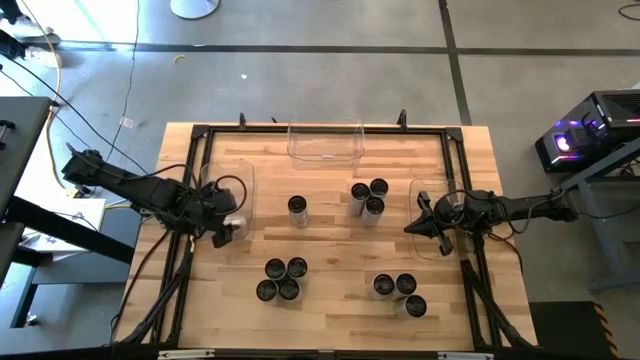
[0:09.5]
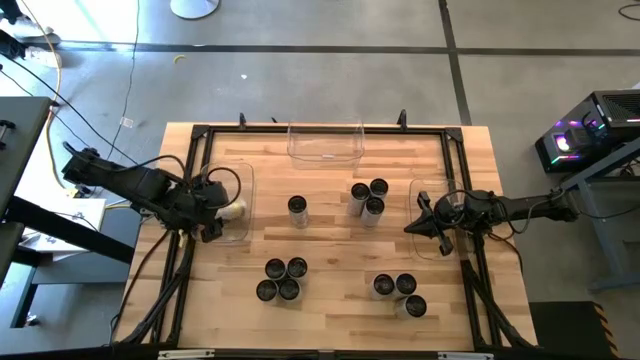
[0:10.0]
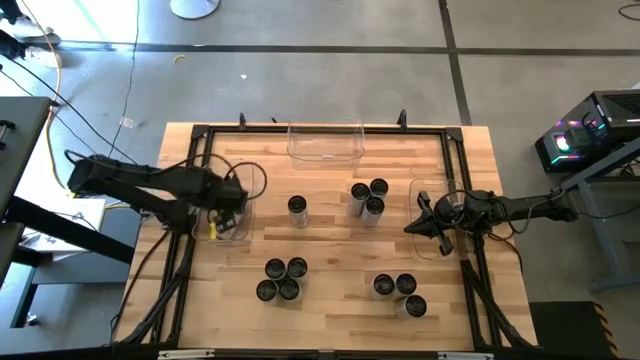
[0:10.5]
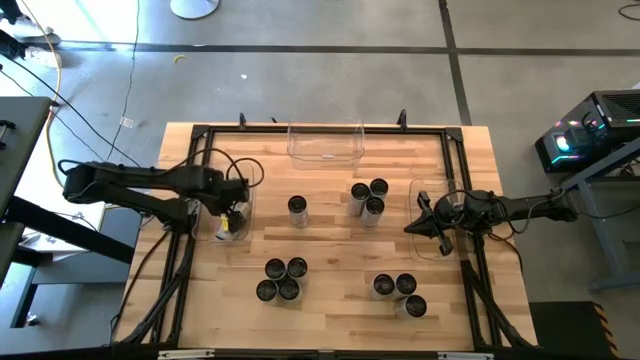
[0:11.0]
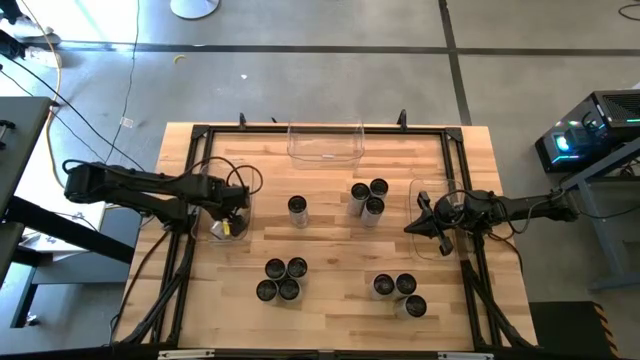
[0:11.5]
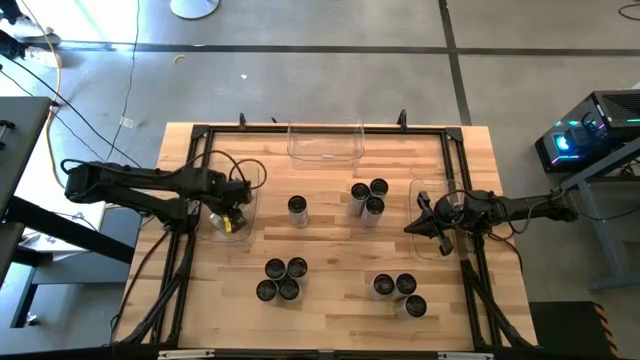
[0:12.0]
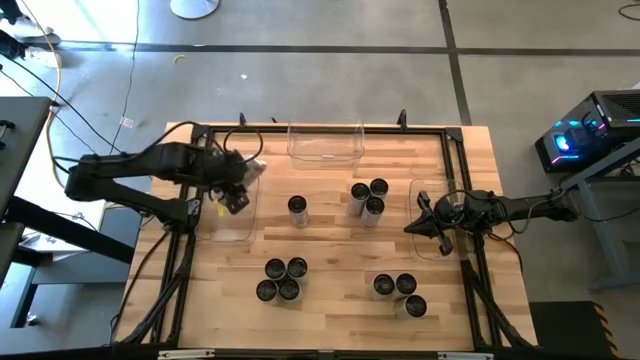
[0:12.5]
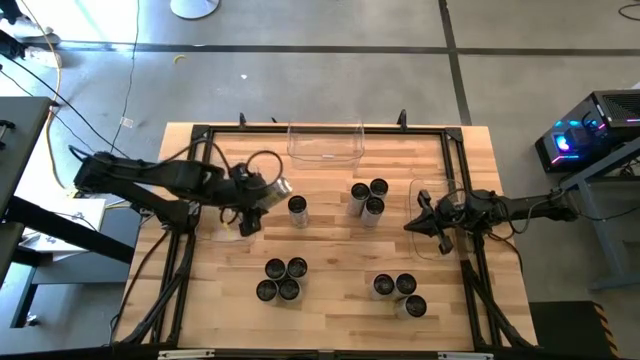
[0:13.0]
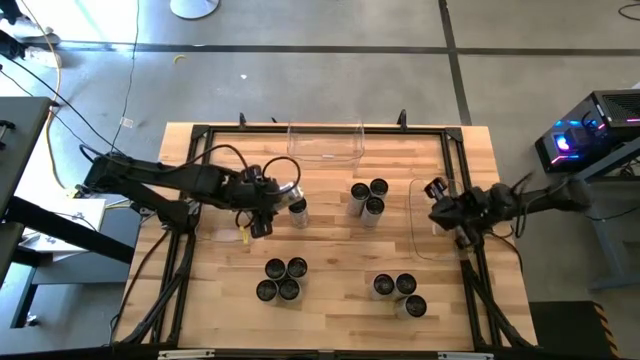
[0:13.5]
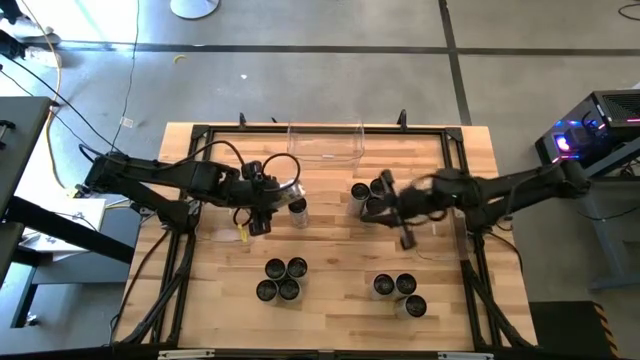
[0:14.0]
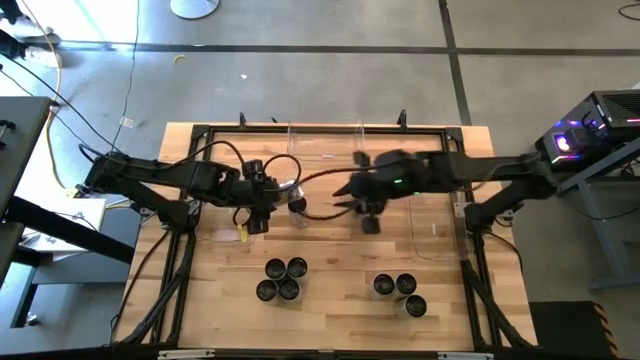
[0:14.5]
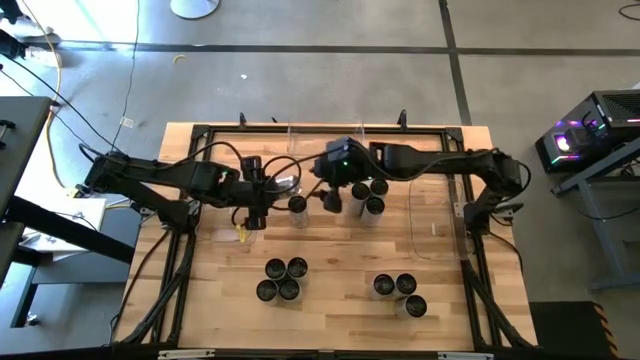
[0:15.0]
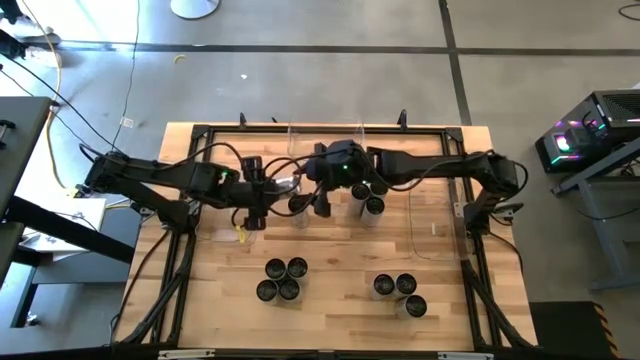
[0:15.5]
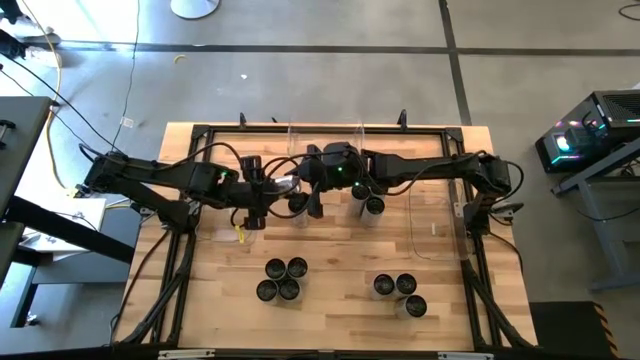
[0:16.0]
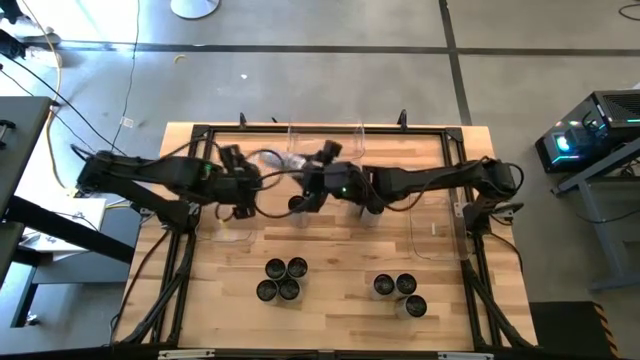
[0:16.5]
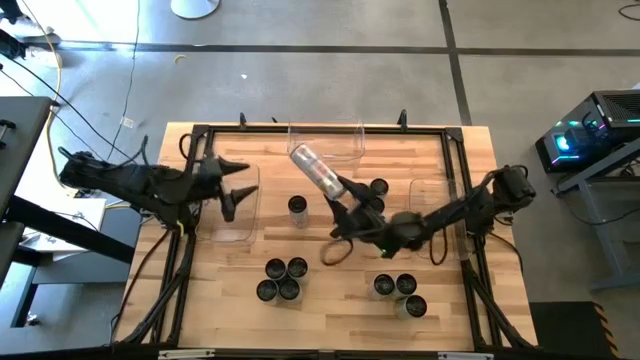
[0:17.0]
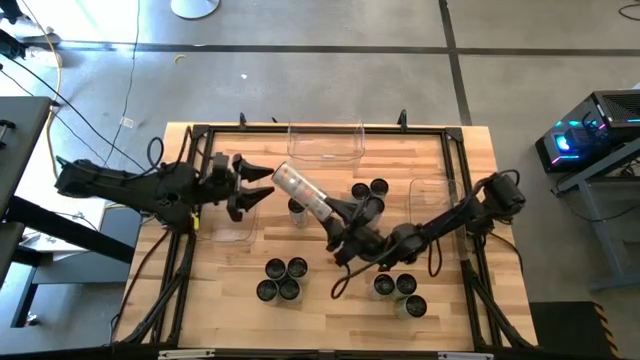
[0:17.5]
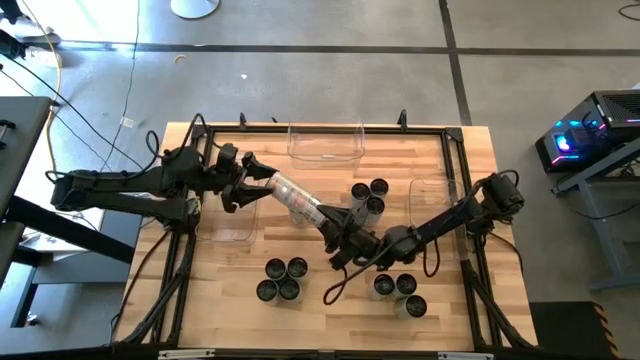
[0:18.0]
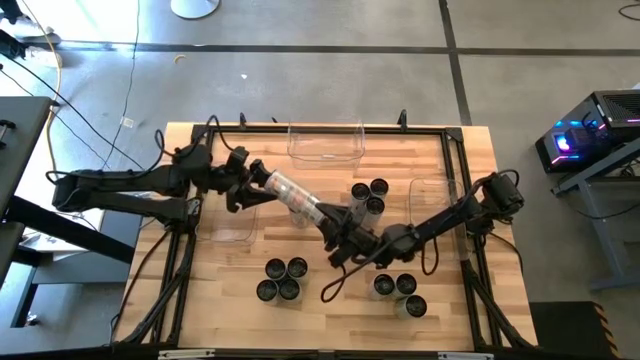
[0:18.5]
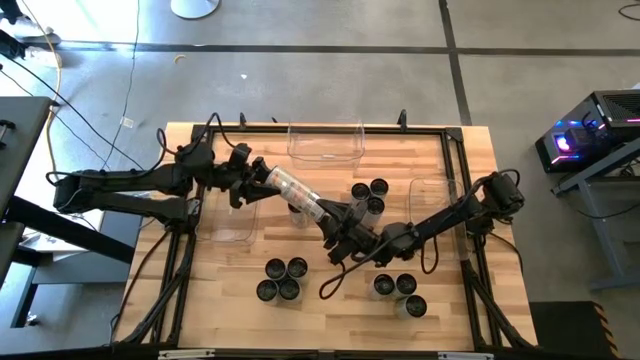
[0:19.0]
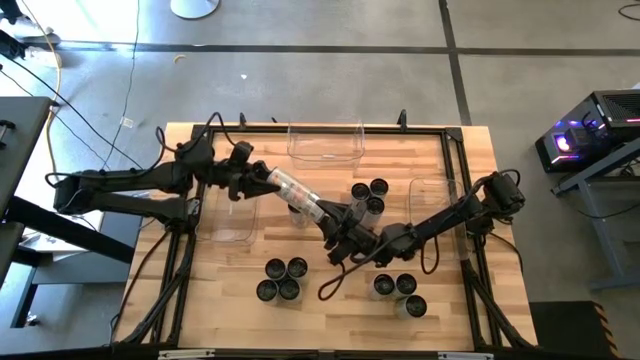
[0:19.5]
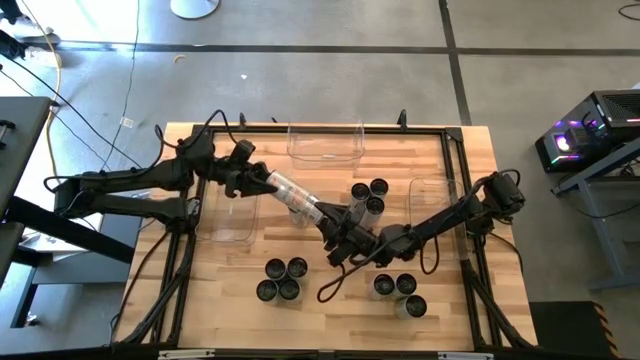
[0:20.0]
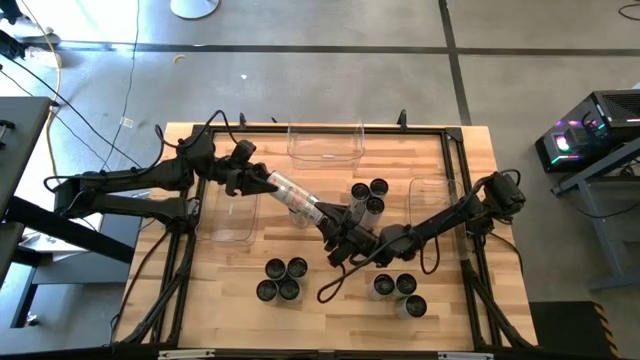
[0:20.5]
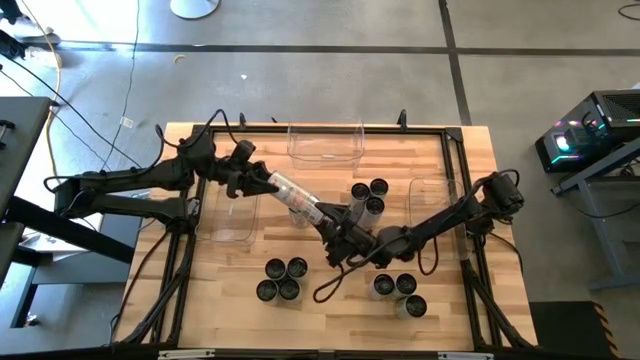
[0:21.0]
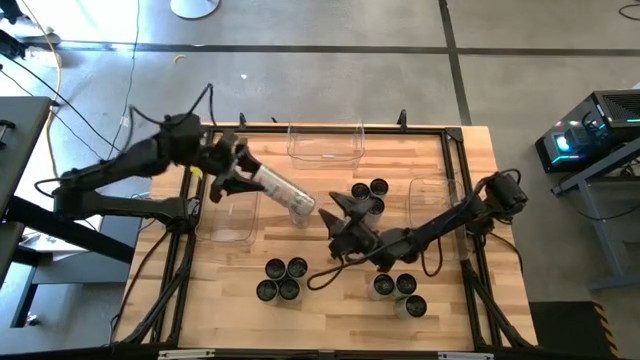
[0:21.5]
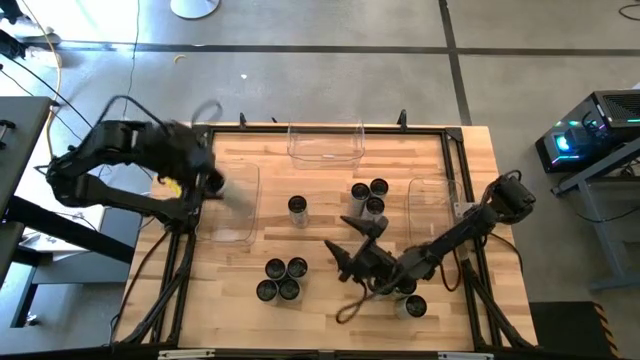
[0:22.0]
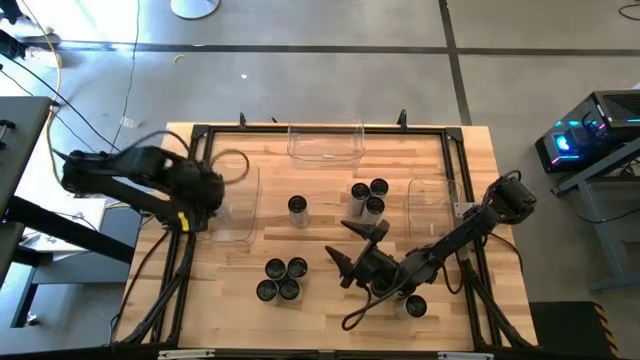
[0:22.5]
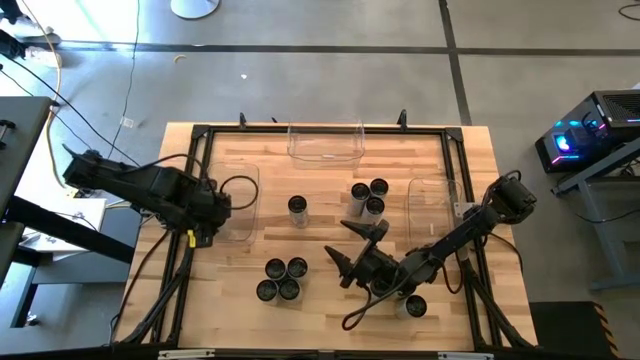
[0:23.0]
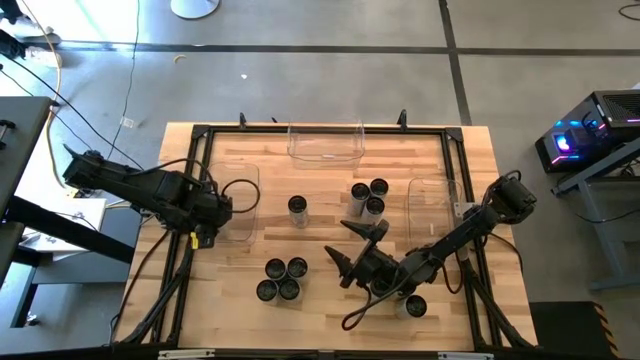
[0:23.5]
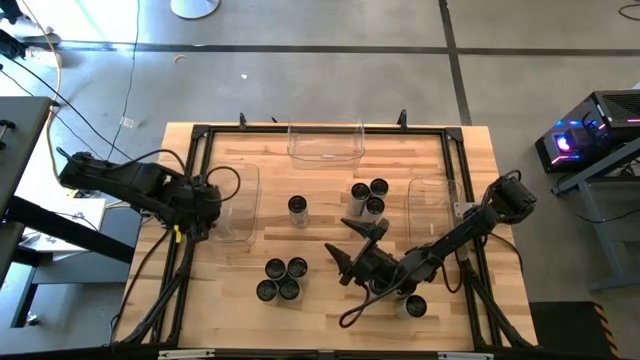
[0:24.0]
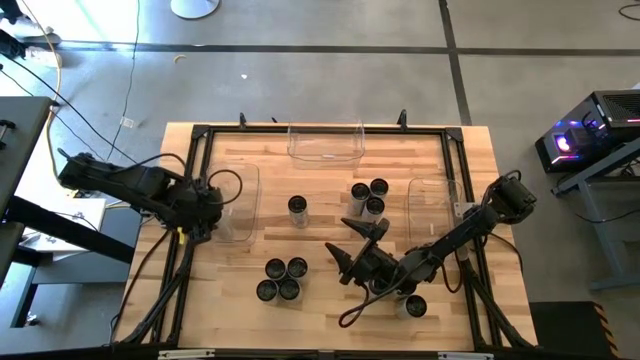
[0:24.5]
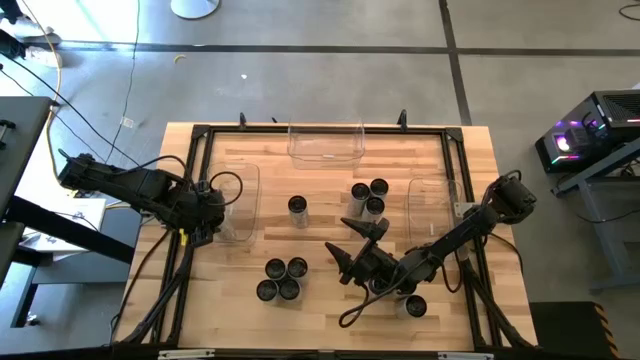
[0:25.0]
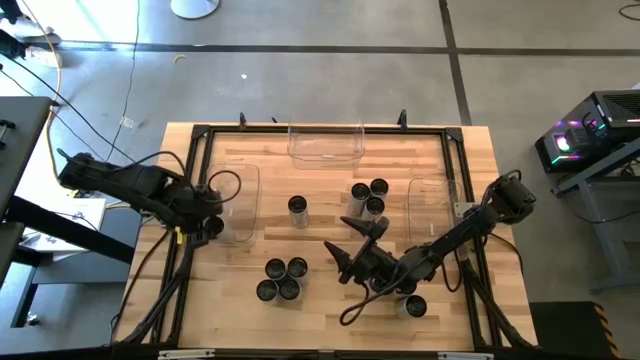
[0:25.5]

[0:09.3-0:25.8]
Task: Sort soda cans
Put the white-yellow soda can into the left transparent bin

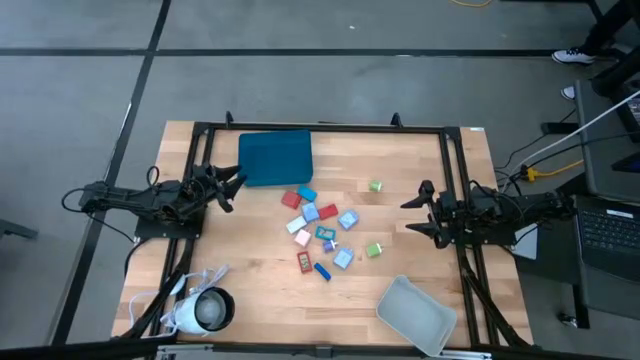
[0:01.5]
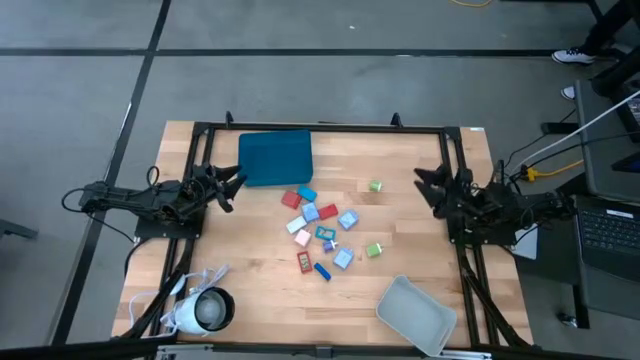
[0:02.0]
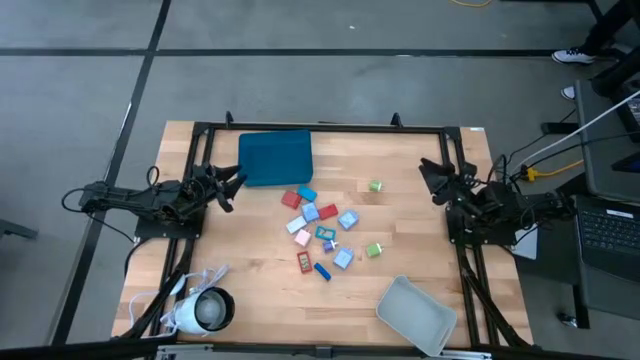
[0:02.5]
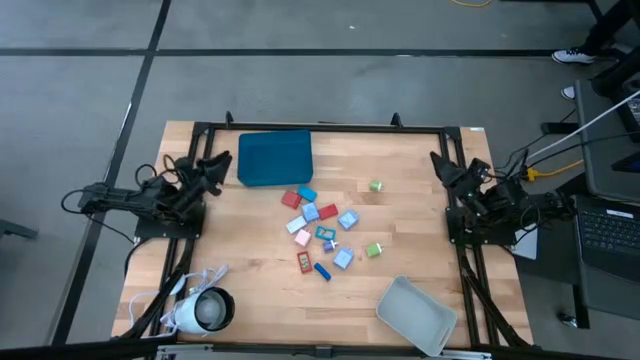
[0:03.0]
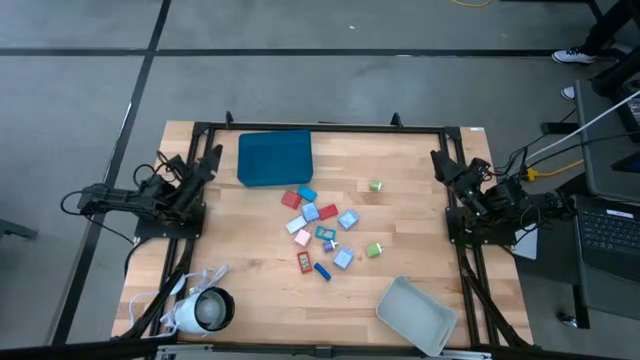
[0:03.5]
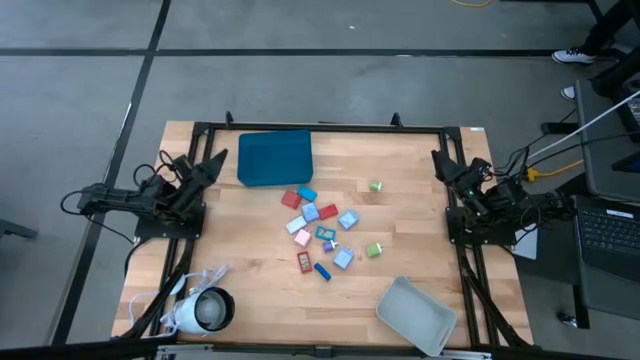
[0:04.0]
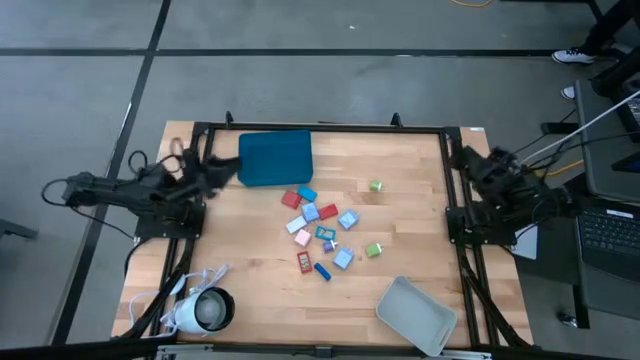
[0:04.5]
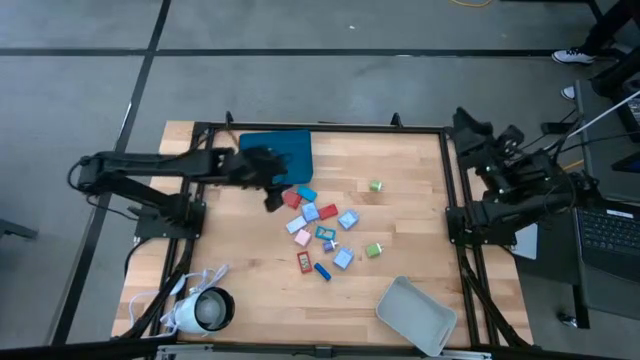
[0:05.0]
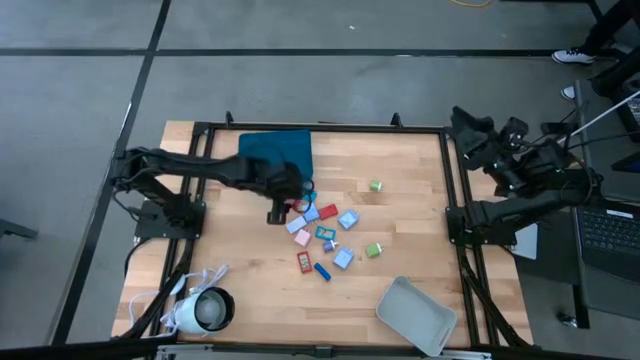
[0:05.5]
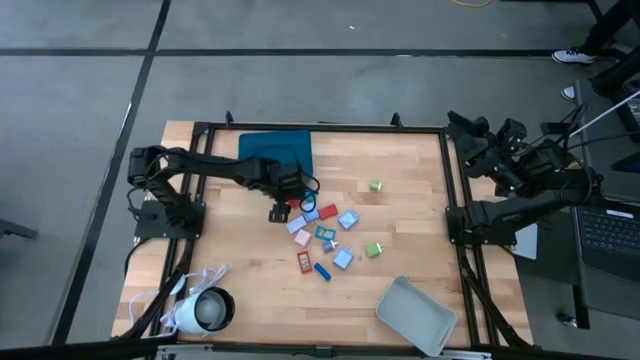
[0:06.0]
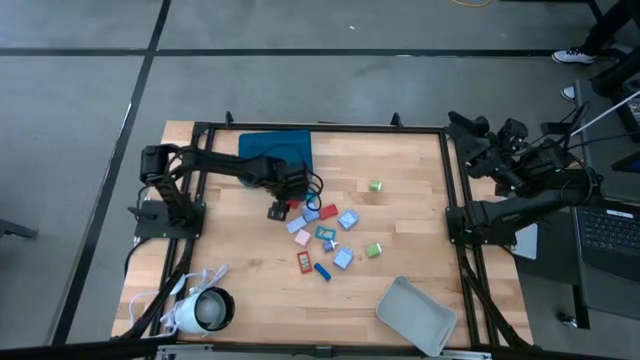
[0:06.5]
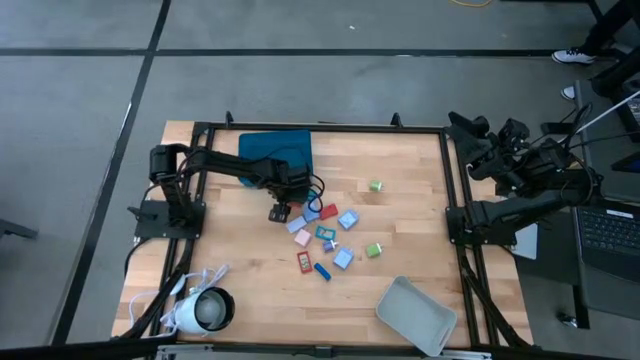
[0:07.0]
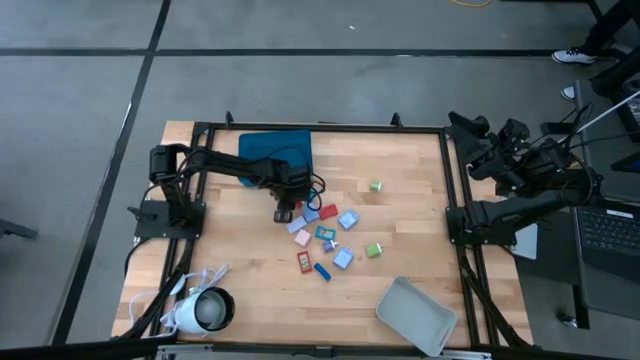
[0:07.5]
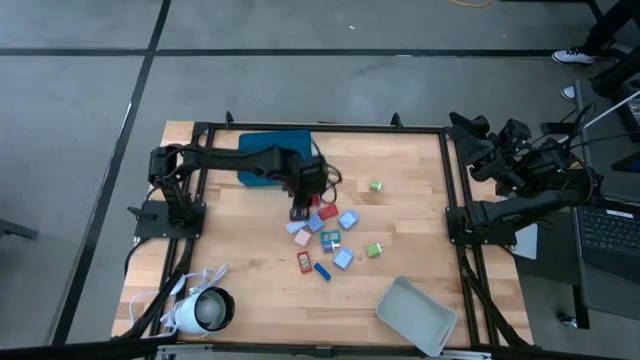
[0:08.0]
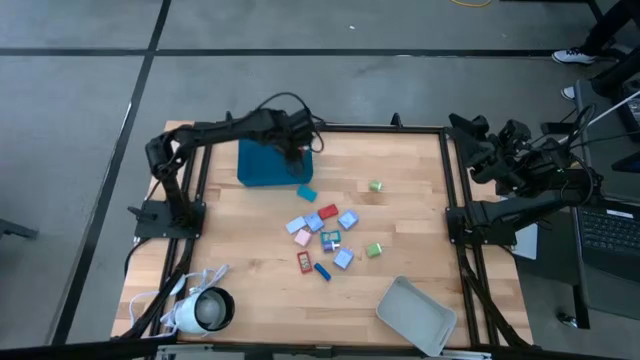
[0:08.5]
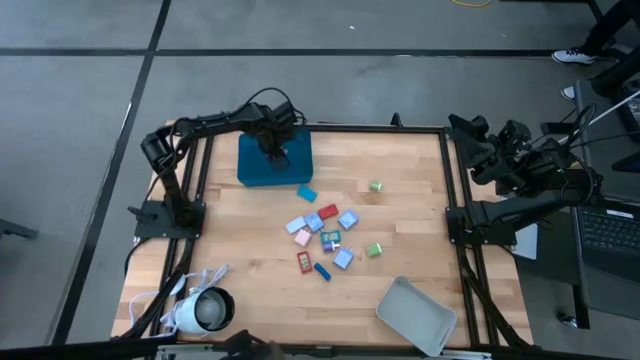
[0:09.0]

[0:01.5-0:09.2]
Task: Pick & Place Office items
Put the red charger adapter into the blue bin
